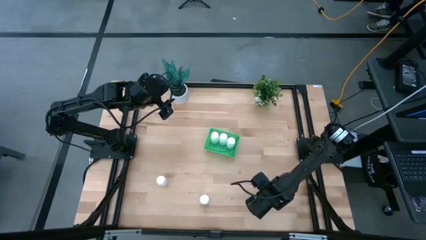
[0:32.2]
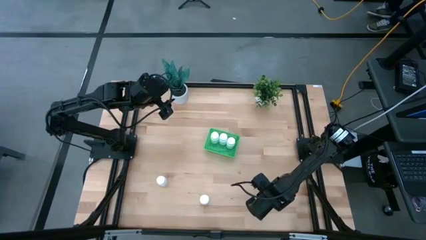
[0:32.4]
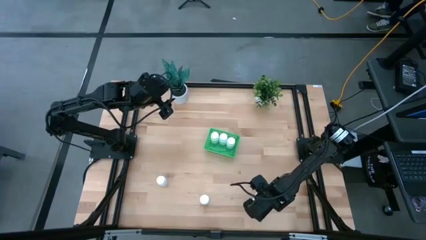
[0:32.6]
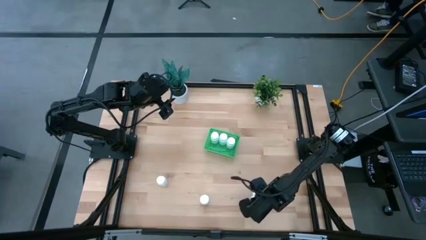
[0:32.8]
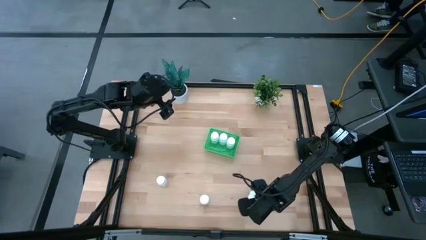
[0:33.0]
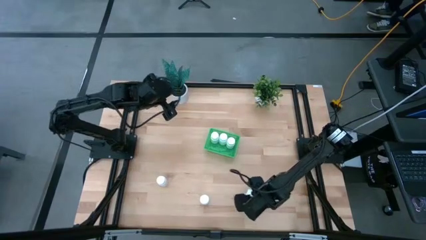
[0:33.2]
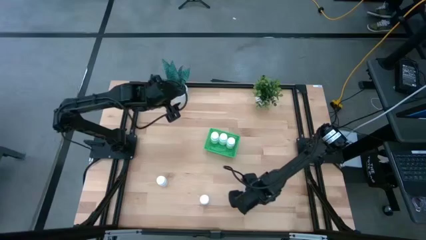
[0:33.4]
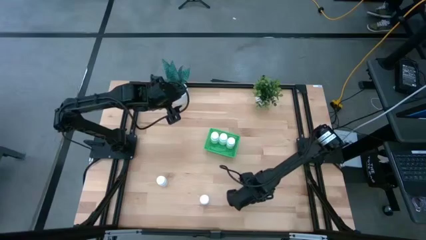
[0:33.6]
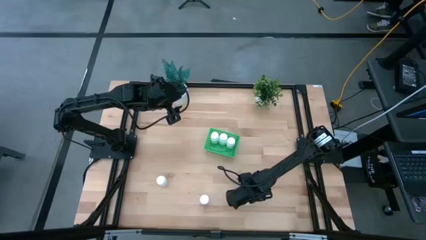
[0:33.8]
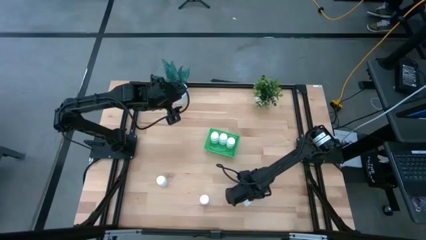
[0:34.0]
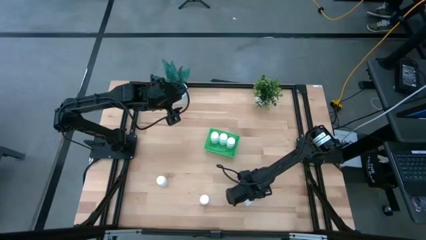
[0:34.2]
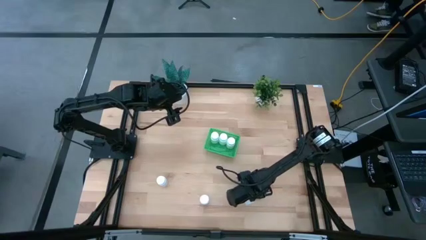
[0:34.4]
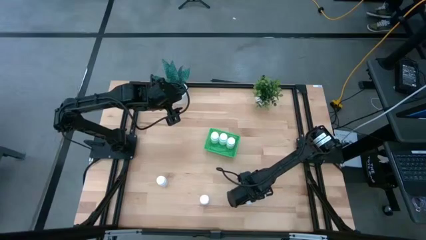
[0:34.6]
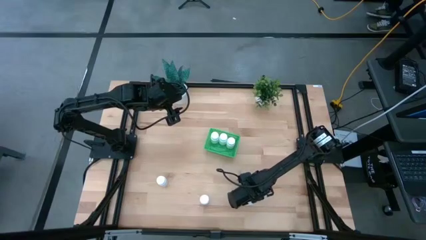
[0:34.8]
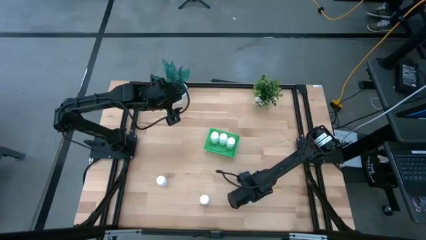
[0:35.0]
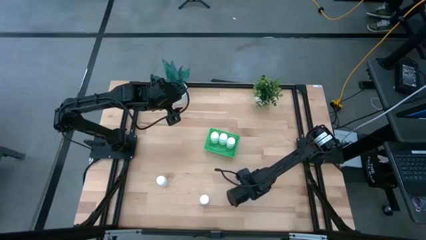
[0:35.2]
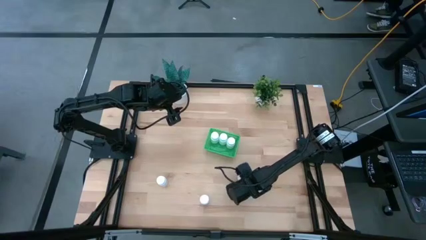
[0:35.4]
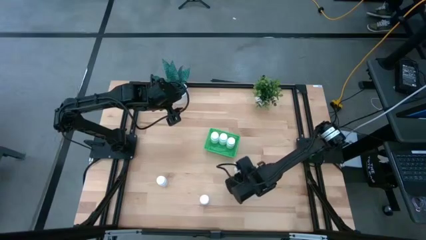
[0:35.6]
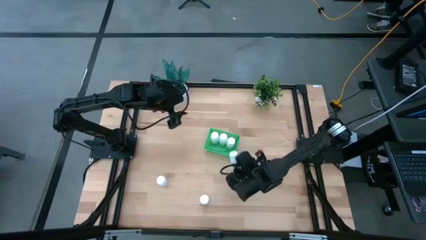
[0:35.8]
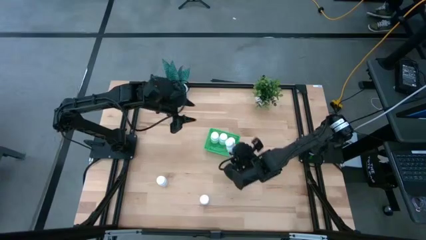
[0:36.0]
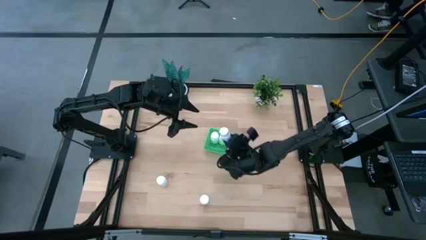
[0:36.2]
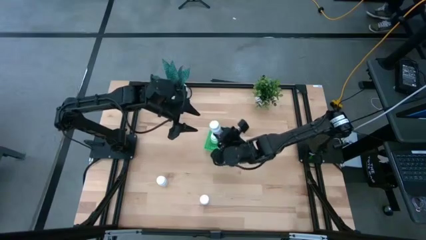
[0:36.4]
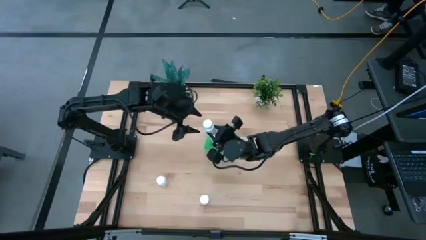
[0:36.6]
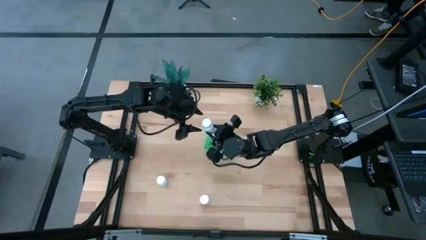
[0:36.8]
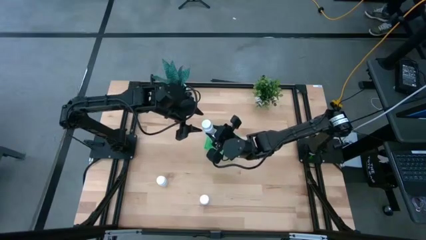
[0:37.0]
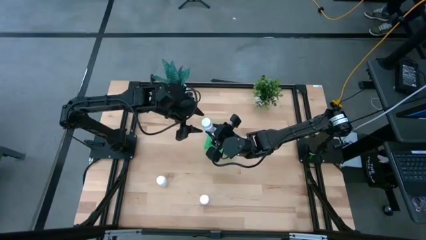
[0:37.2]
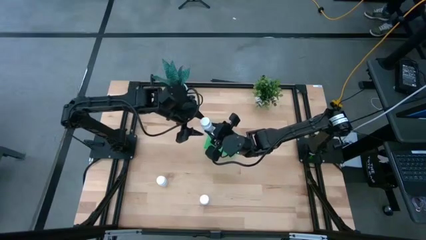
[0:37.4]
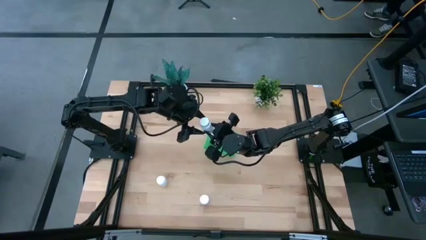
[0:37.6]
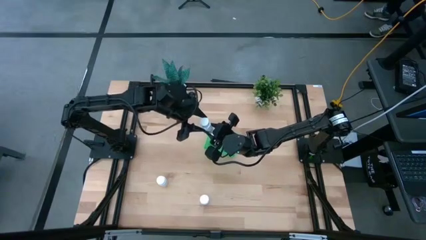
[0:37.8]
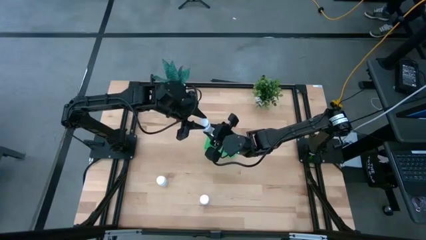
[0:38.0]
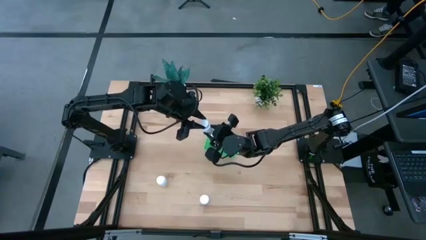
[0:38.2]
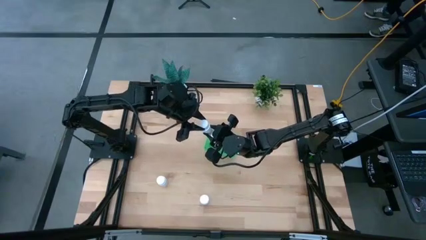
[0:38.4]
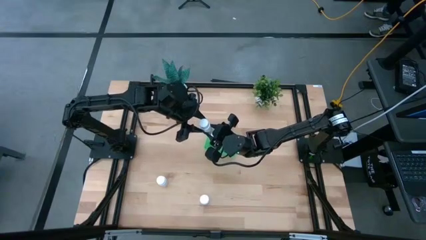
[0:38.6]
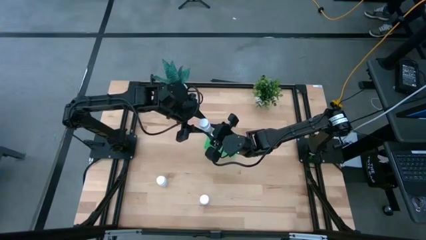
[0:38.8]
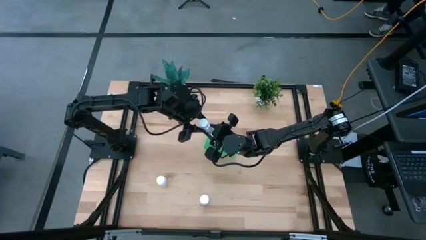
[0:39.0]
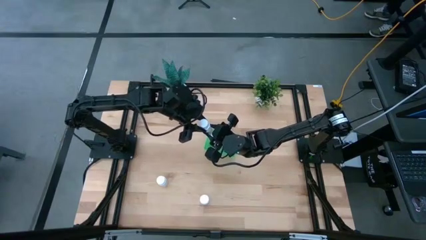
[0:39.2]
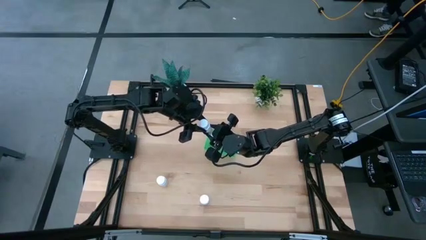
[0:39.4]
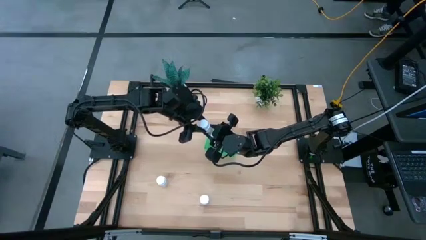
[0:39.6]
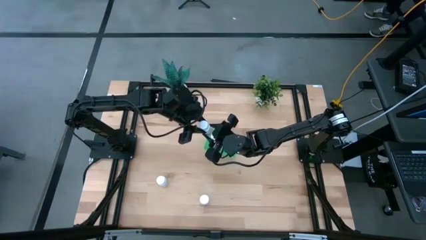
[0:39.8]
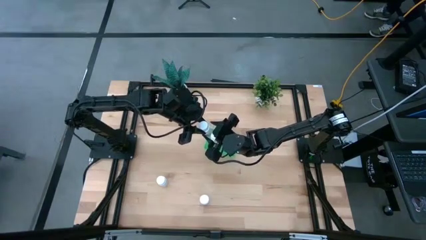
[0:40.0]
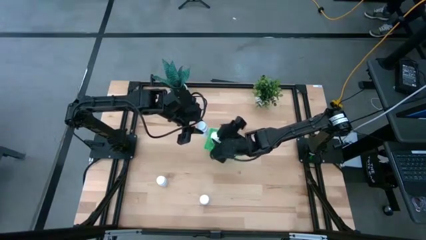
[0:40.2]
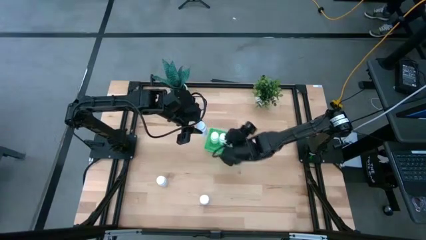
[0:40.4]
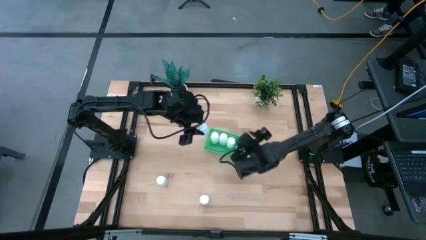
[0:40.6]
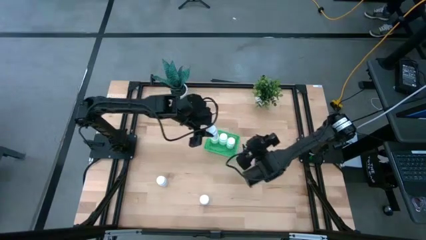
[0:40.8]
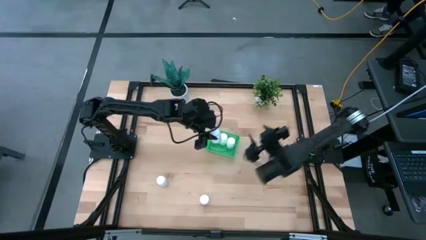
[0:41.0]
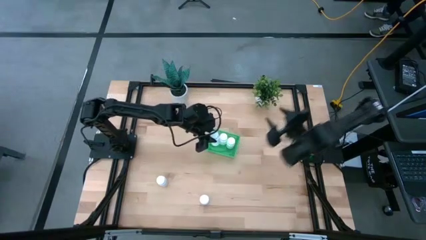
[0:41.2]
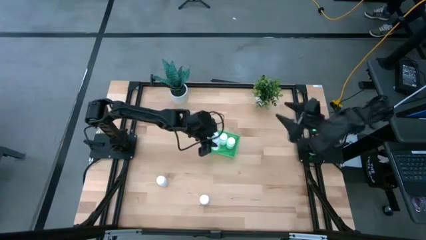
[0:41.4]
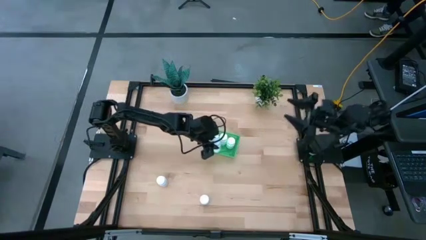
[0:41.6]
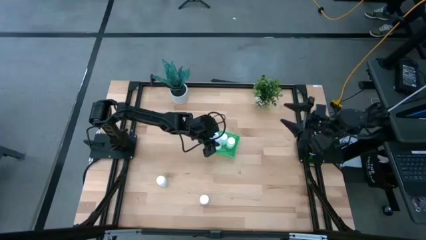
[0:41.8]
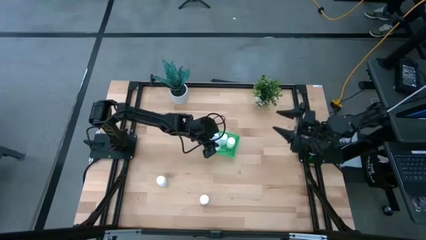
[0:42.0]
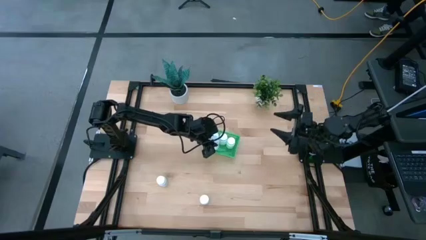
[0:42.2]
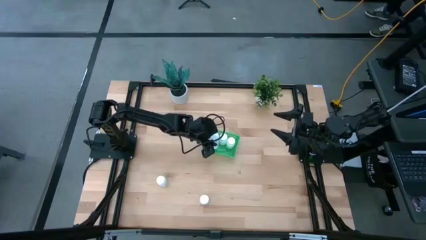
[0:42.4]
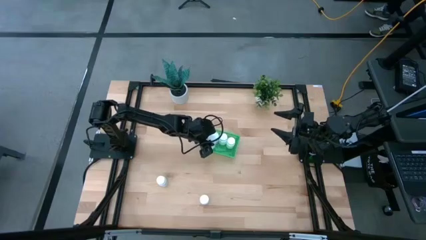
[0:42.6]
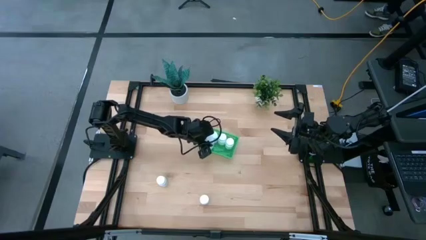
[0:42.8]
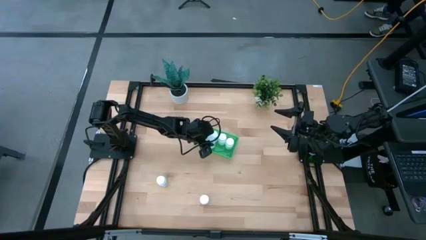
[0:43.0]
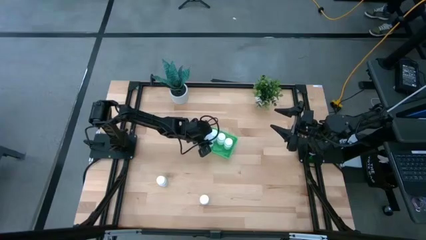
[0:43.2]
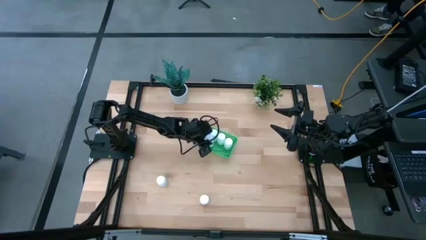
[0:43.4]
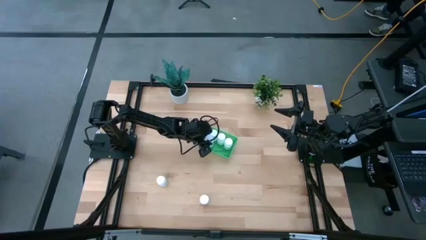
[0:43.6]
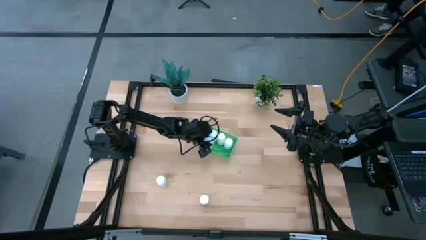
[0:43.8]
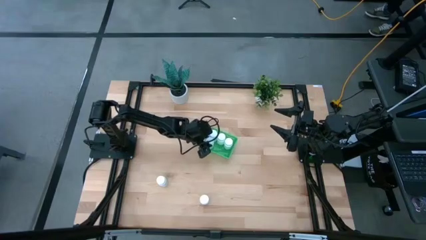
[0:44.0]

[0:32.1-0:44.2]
Task: Pick and place pill bottles into a basket
Put the right medicine bottle into the green basket

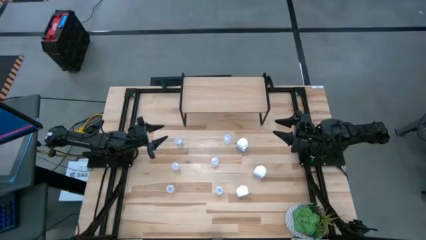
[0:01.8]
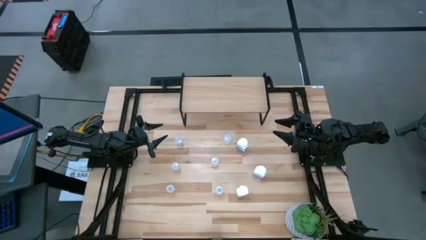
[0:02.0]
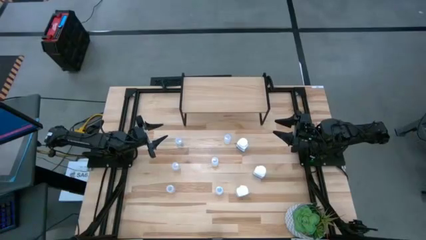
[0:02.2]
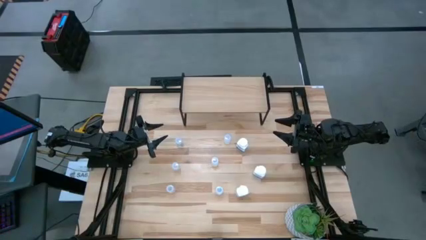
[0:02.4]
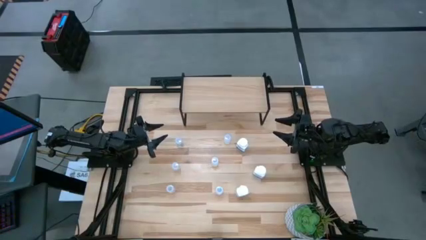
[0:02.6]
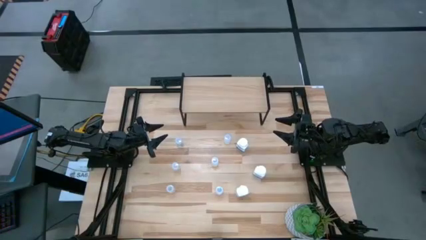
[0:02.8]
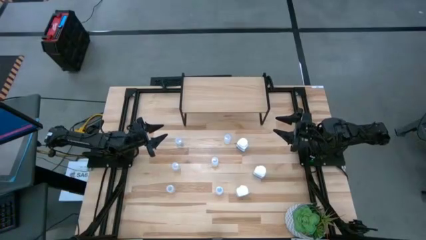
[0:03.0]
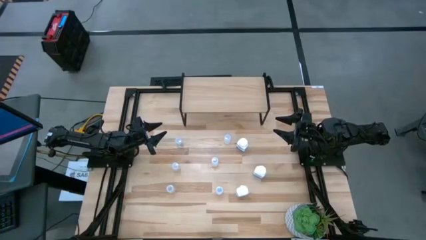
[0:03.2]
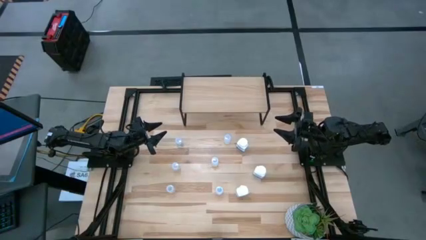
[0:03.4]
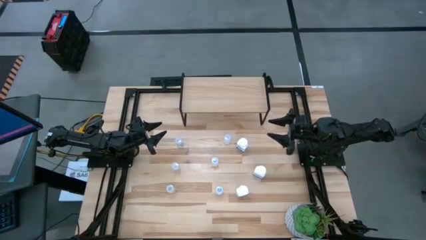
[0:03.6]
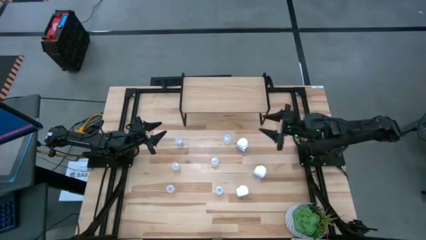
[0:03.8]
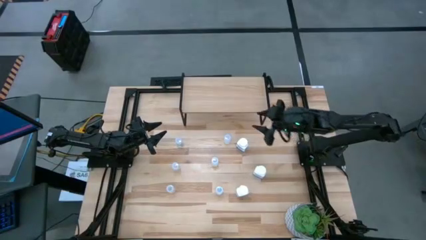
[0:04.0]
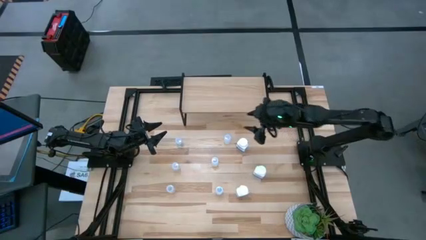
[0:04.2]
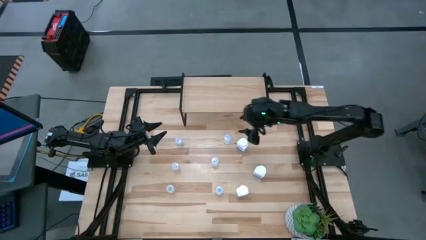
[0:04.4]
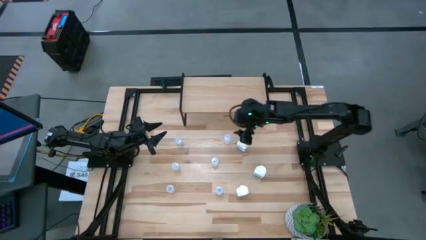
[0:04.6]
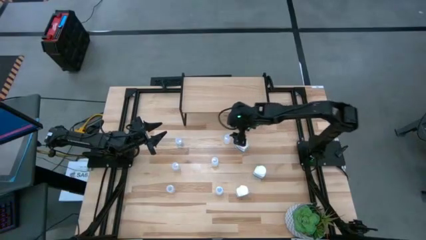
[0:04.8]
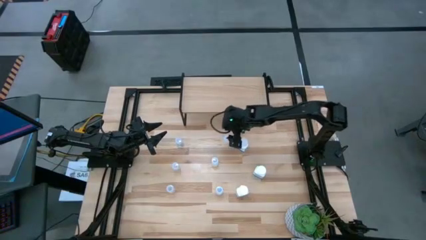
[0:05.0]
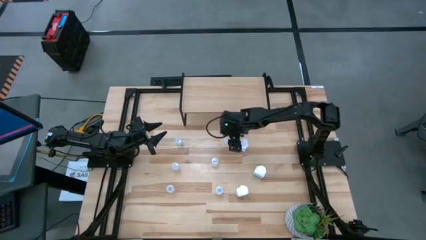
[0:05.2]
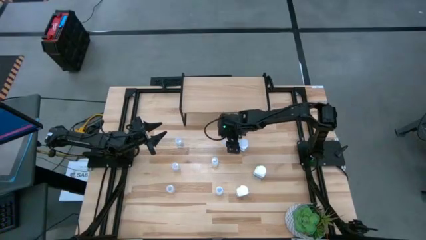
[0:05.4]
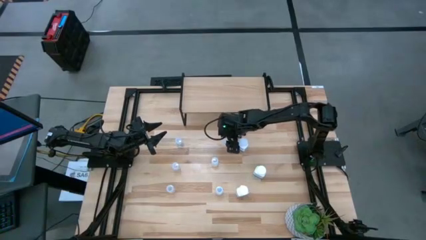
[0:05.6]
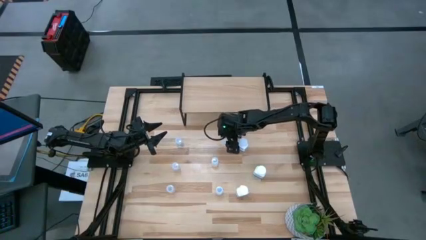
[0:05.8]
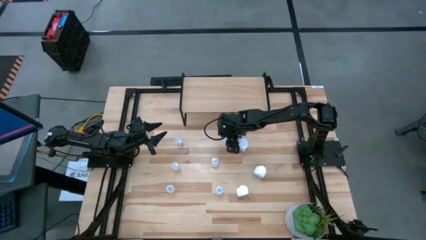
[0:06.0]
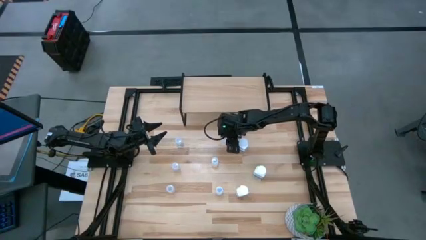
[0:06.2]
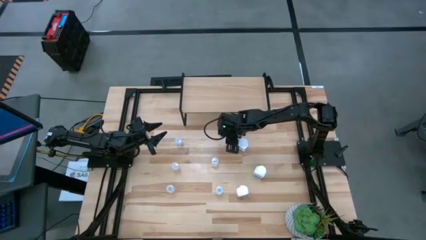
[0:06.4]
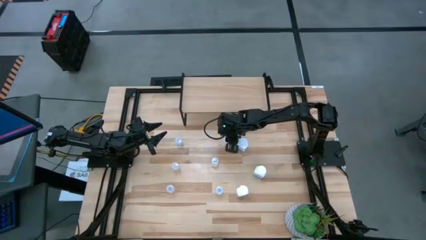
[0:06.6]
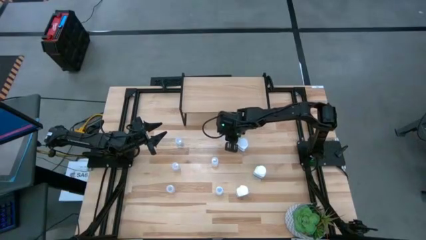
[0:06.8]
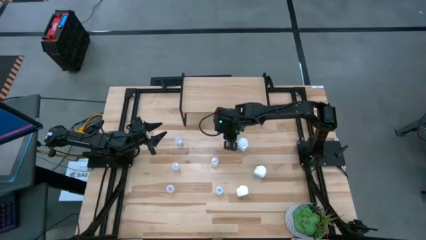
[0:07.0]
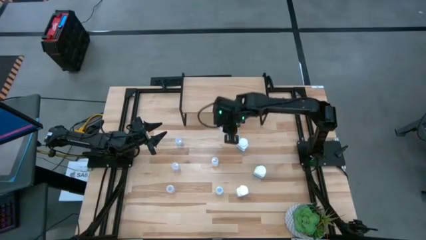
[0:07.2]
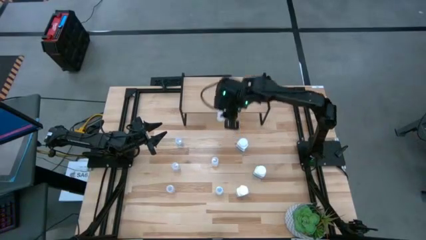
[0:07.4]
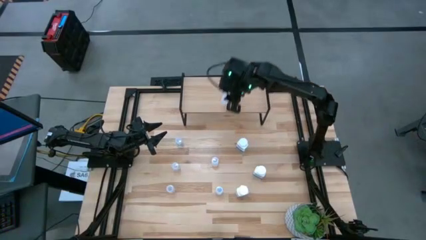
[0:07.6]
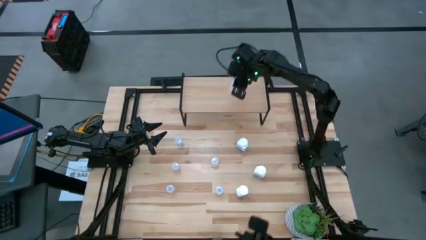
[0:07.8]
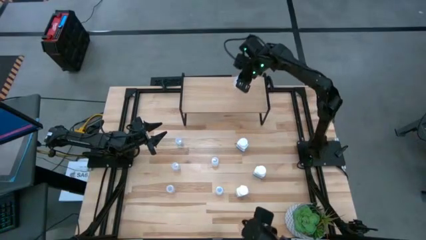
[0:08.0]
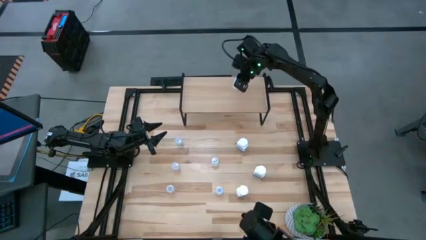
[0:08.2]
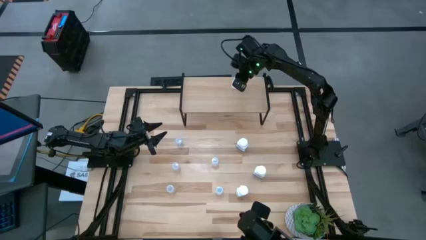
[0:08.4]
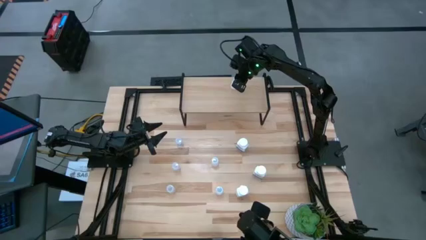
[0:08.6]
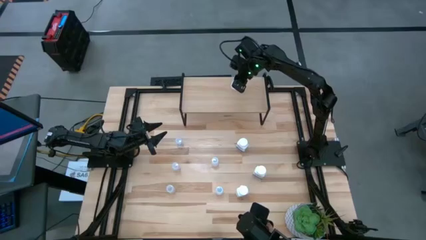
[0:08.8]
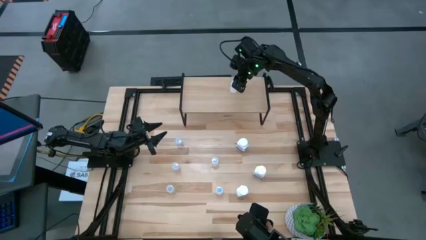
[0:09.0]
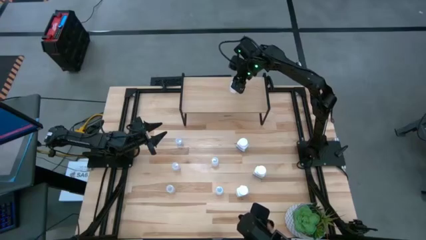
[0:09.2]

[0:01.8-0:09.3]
Task: Pick and place medicine bottles onto shelf by color
Put the small white pill bottle on the shelf
